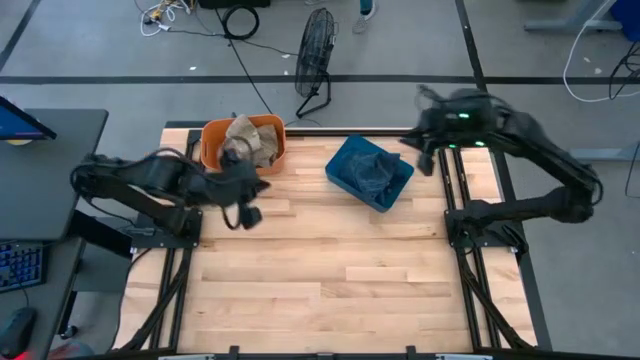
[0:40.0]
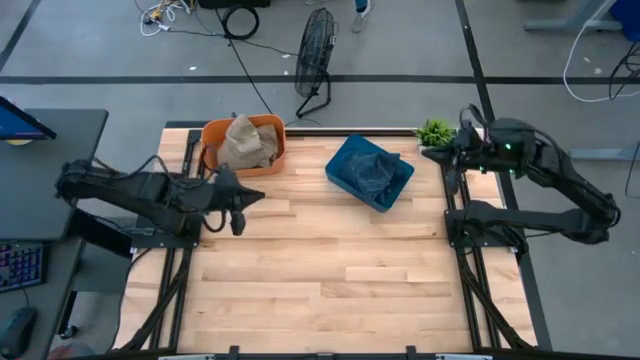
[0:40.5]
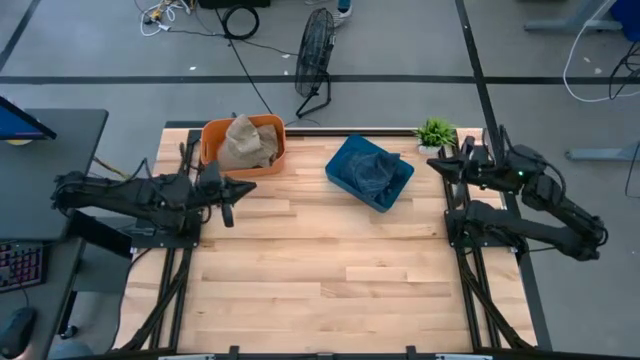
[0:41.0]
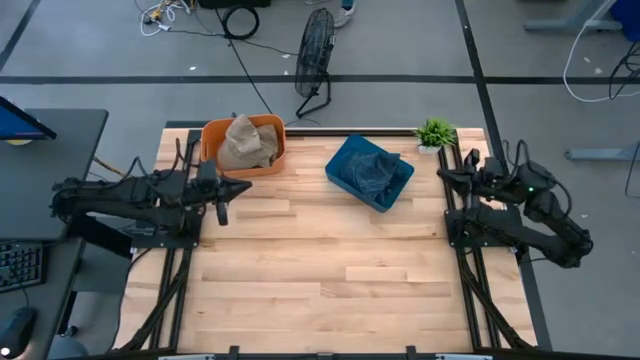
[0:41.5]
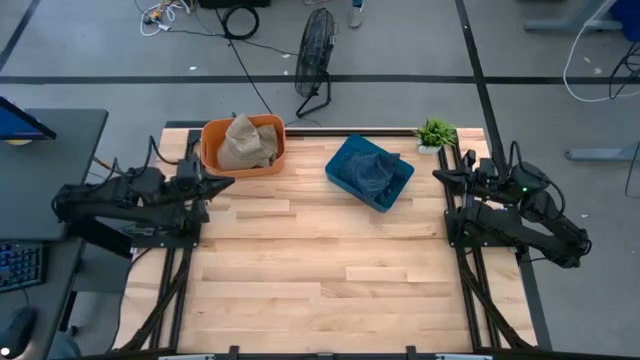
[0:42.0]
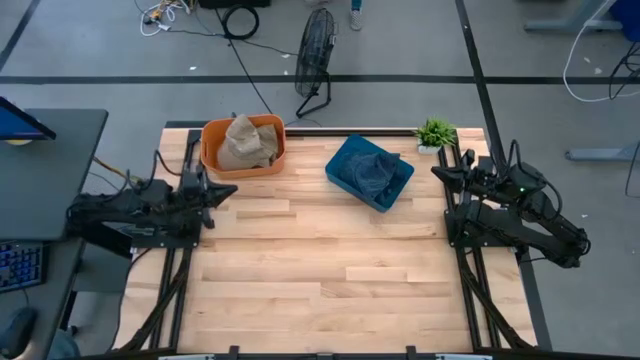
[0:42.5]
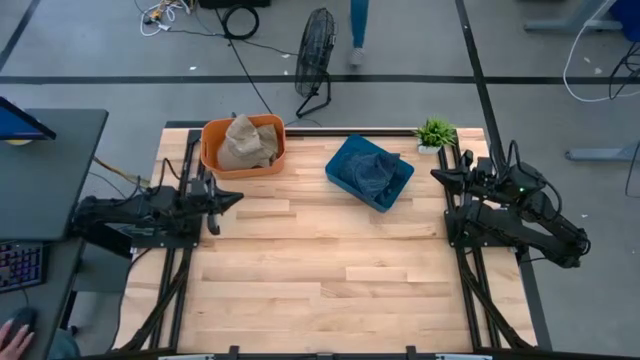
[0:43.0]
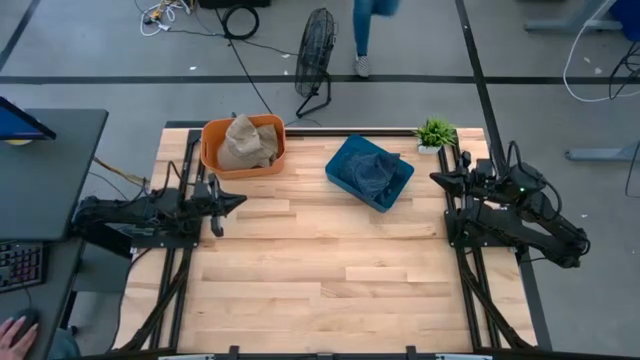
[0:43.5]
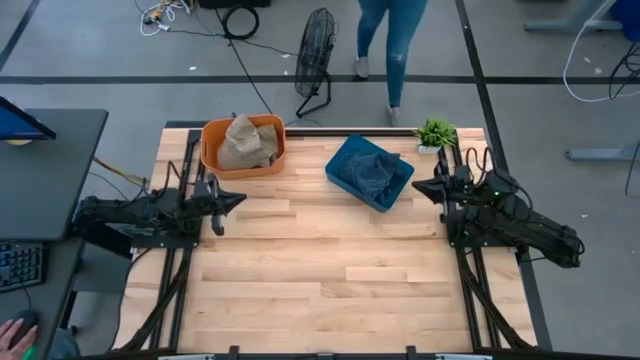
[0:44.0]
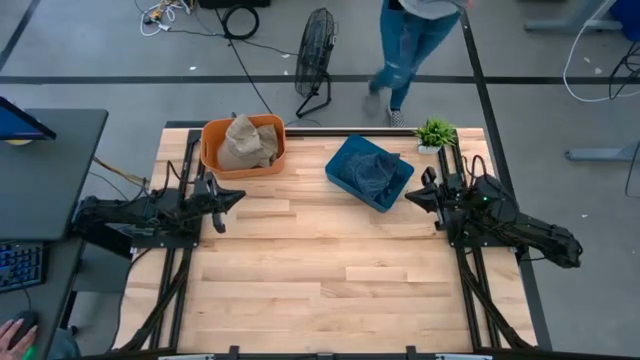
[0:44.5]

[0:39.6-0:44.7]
Task: Pick & Place hat
Return to Home Position

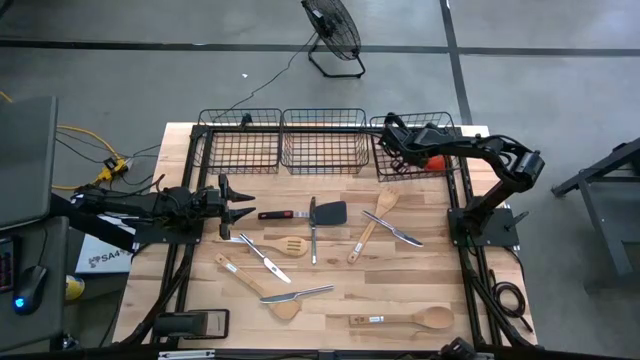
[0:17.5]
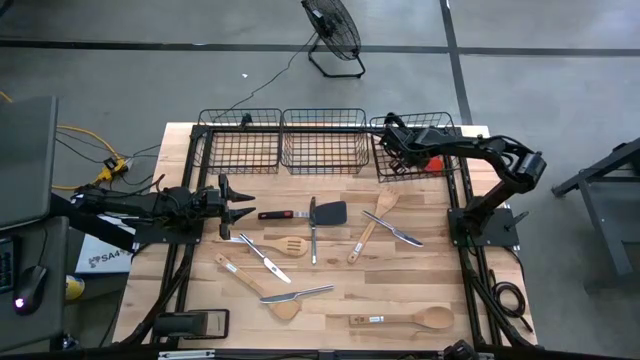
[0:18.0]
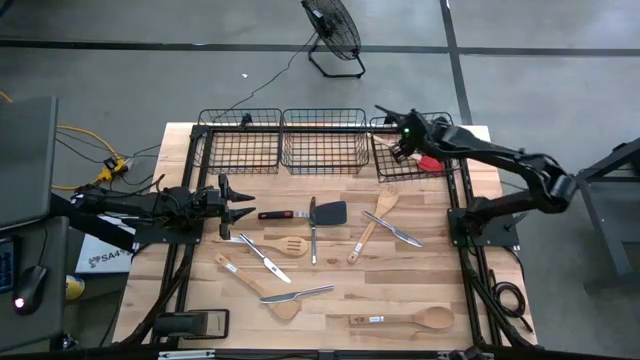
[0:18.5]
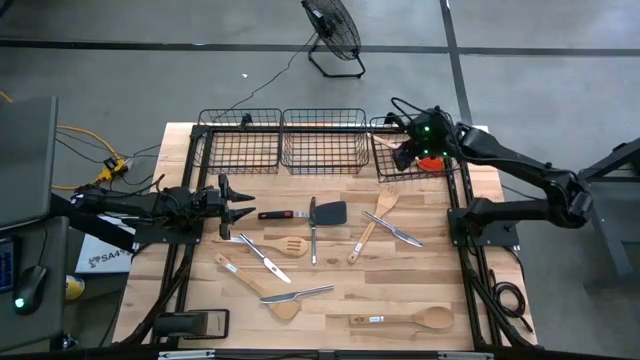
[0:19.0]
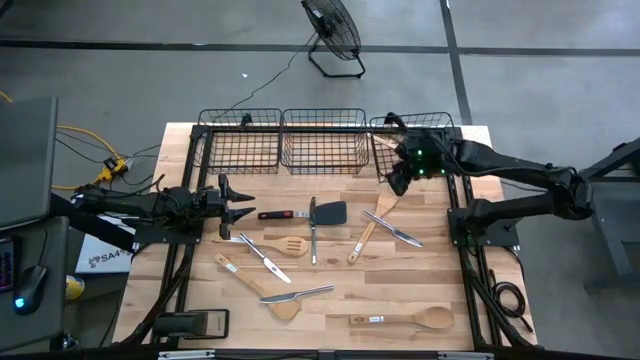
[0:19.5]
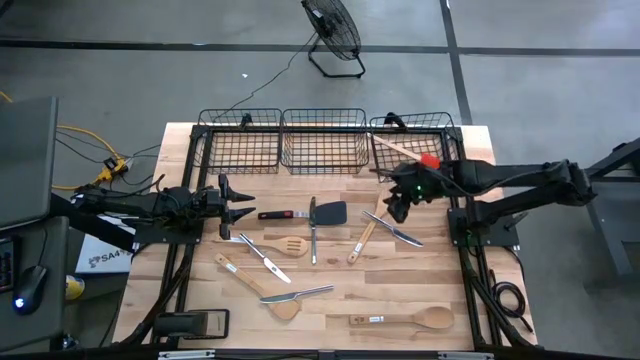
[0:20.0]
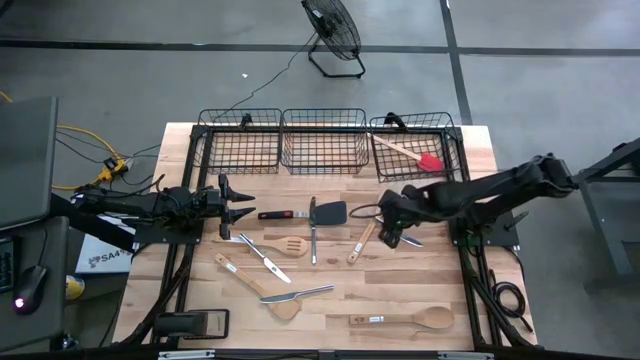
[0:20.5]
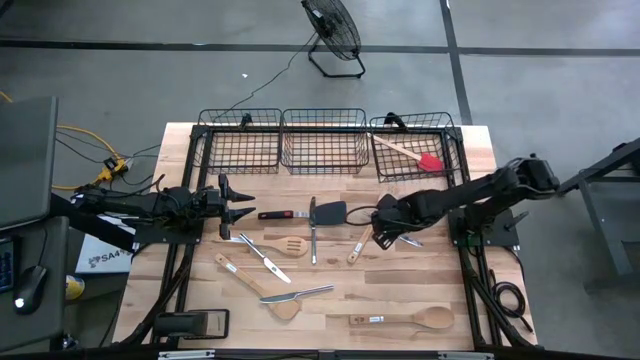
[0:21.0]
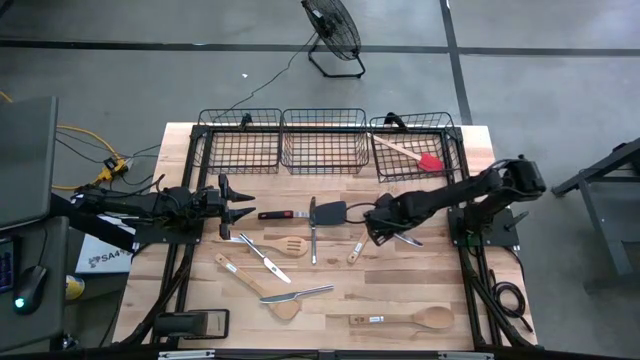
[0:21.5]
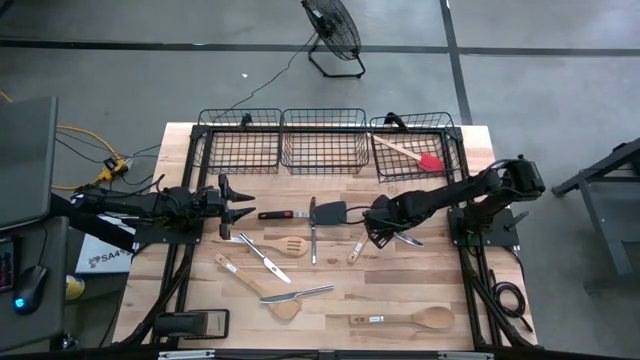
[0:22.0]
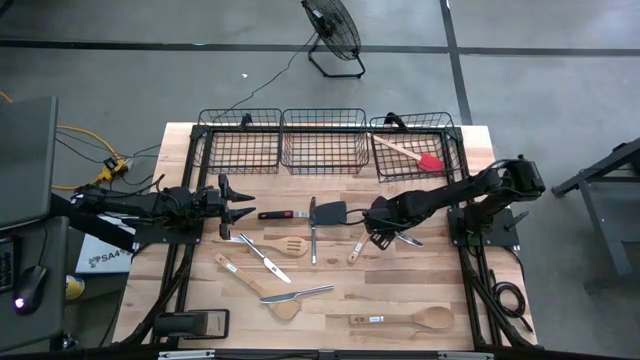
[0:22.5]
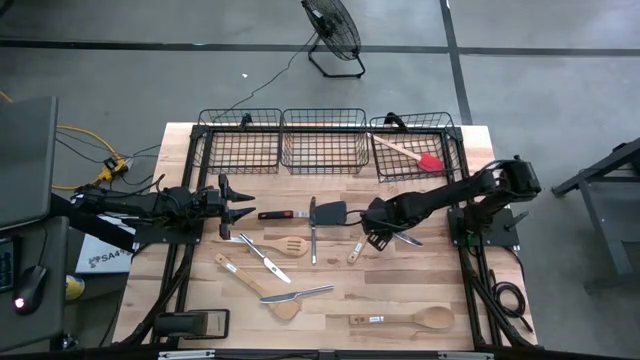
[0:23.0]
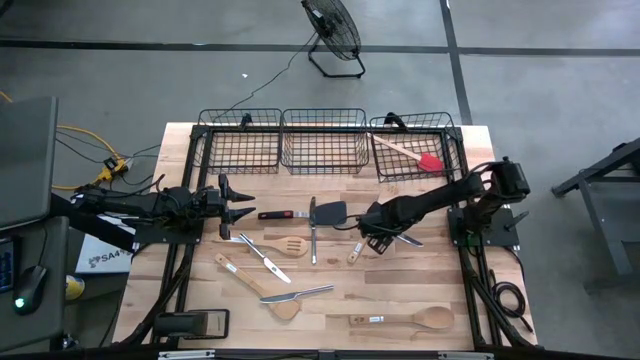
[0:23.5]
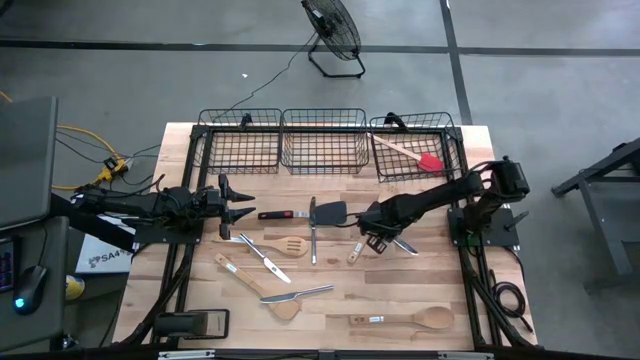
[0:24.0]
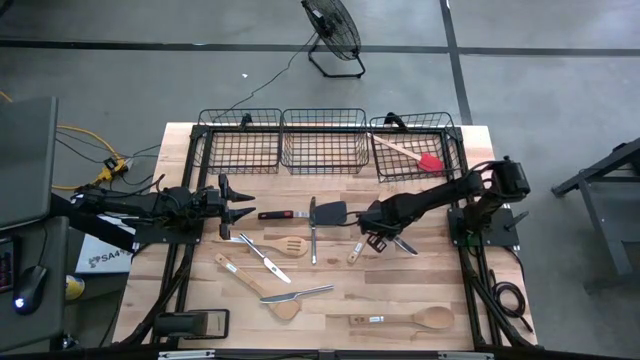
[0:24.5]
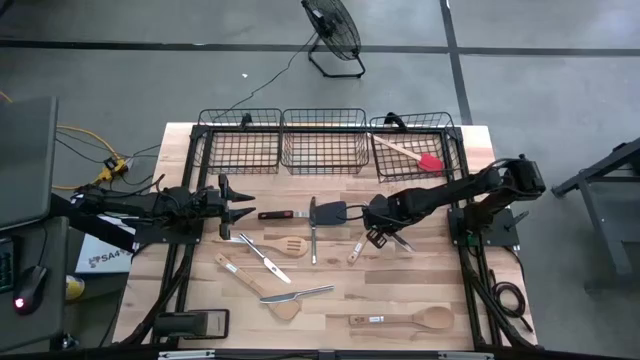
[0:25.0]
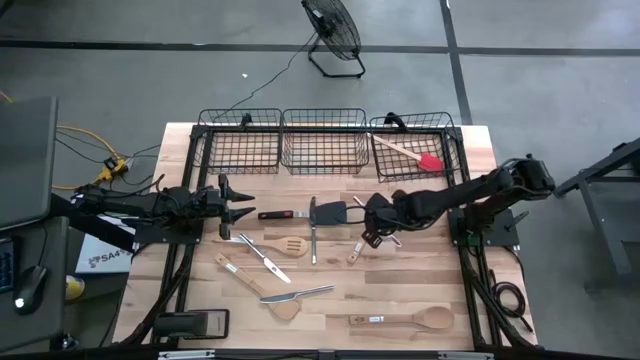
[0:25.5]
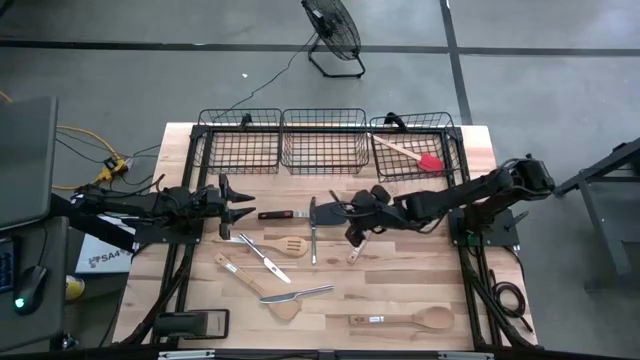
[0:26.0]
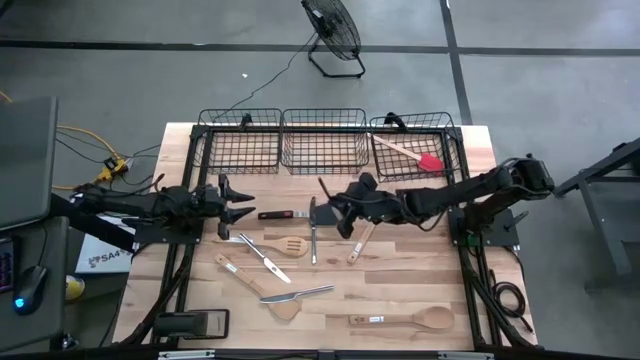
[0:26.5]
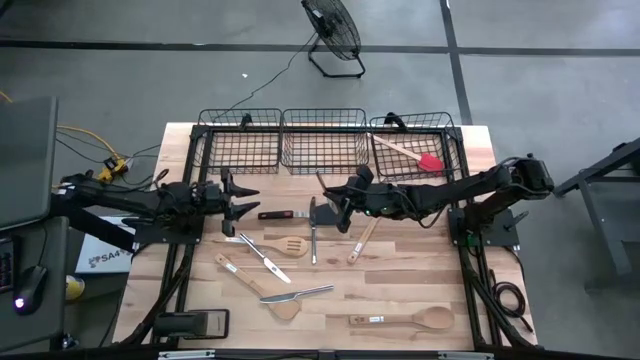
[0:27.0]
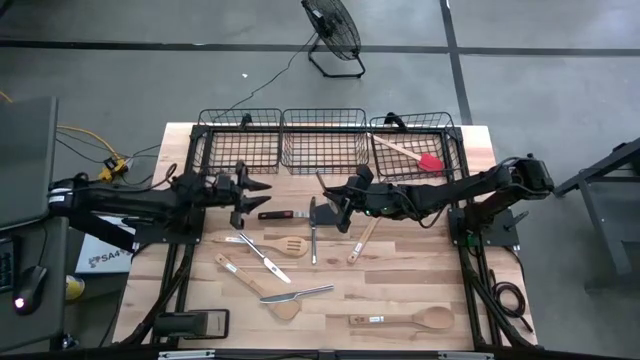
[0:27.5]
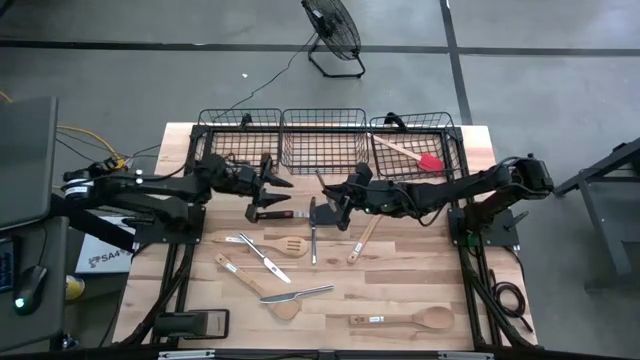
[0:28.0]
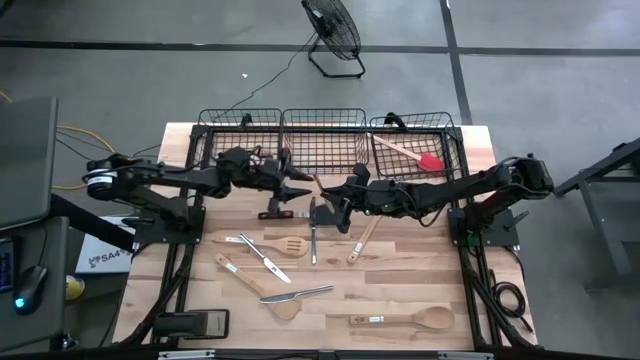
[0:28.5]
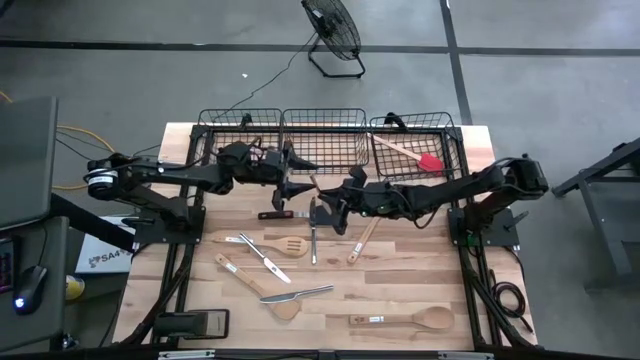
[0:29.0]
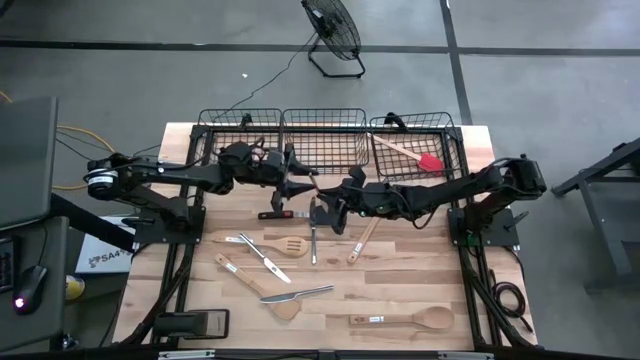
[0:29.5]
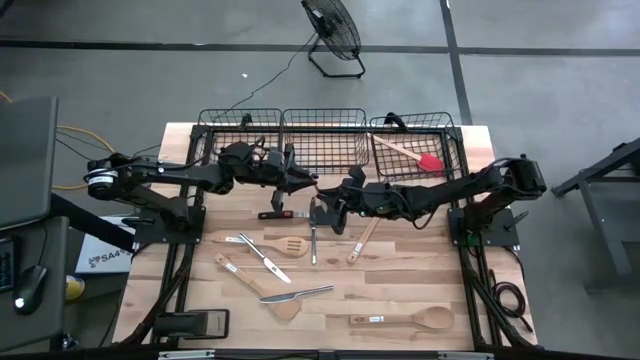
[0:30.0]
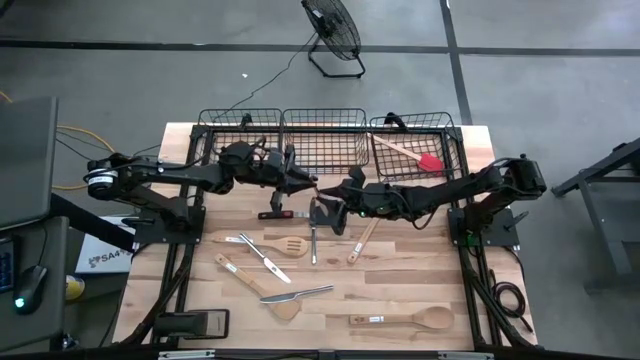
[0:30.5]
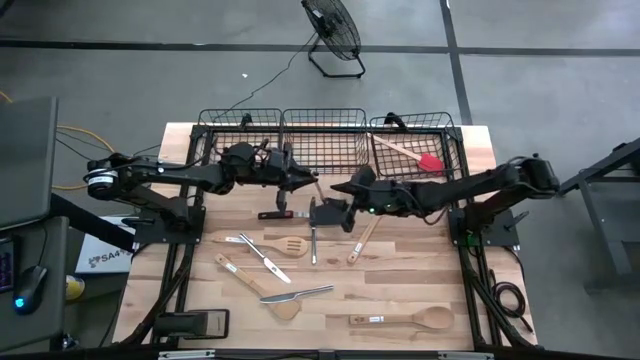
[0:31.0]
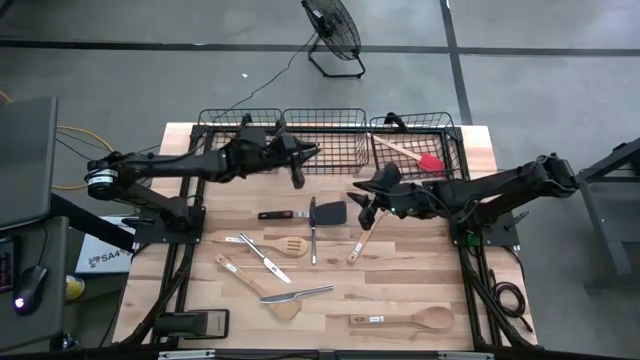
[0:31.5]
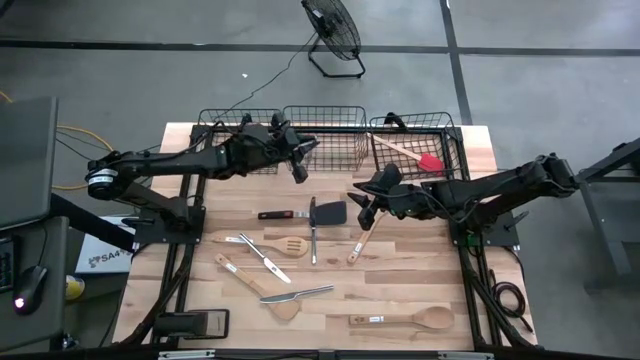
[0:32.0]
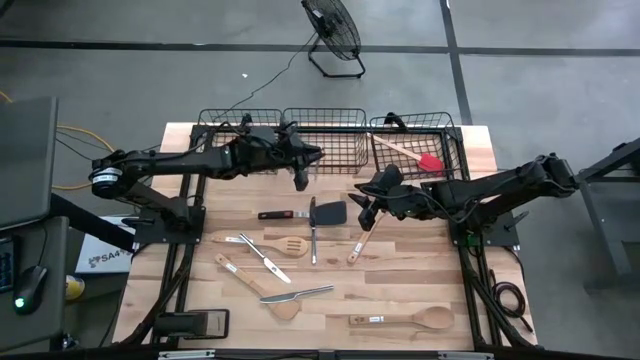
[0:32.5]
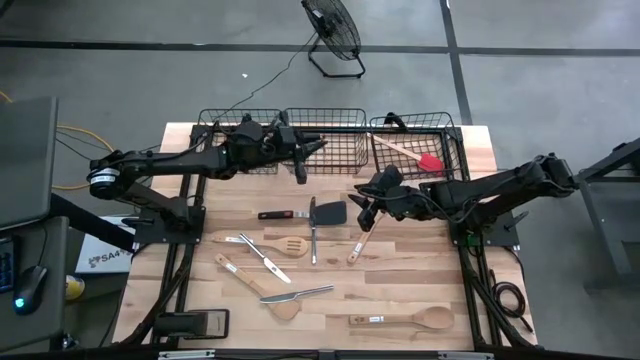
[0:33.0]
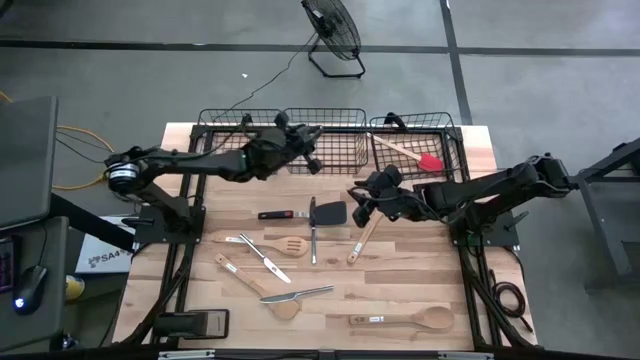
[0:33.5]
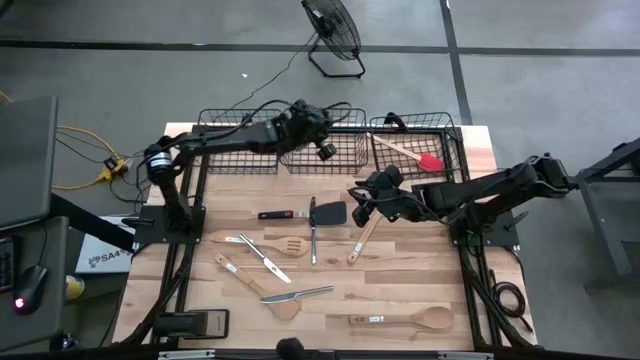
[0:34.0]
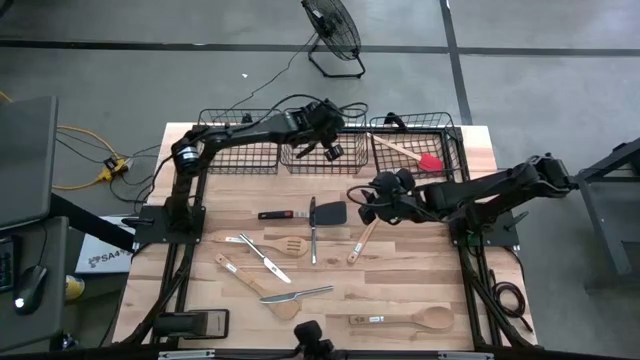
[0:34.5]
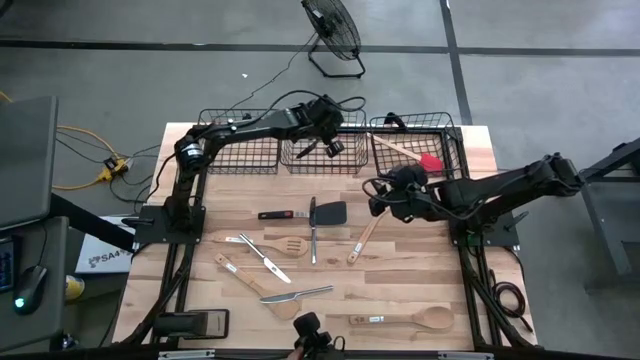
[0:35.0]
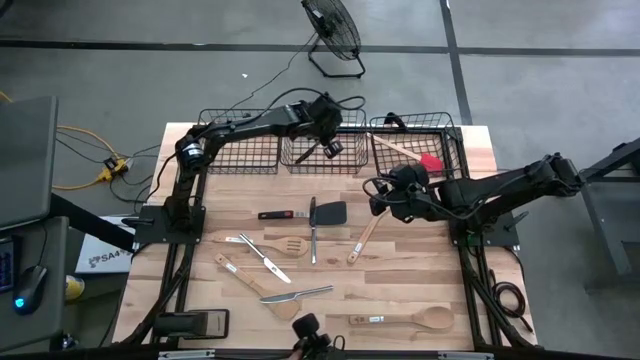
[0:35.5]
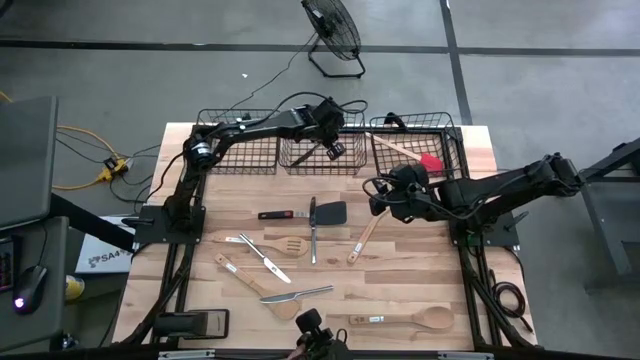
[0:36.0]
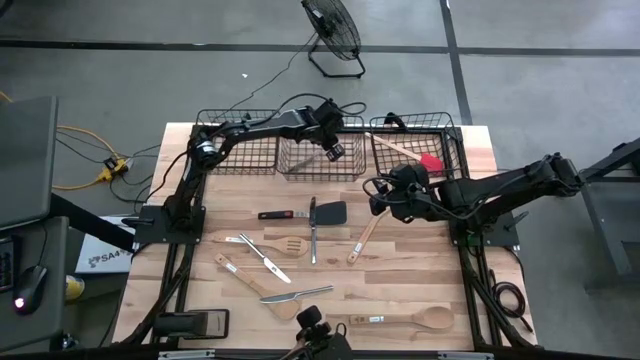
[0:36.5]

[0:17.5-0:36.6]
Task: Pick & Place Kitchen Items
Put the silver table knife into the middle mesh basket
